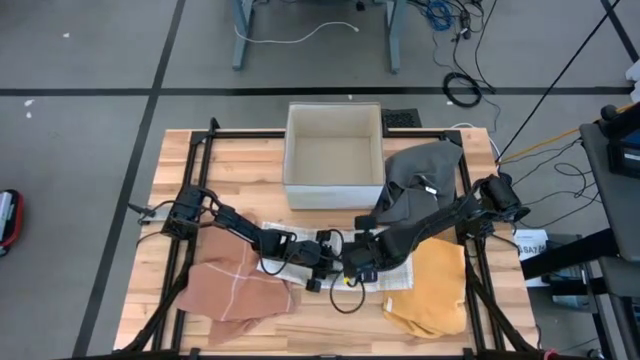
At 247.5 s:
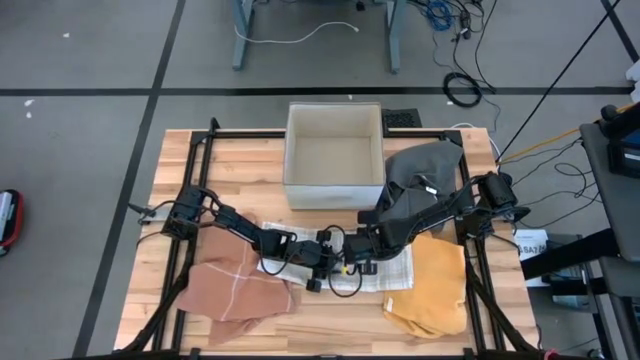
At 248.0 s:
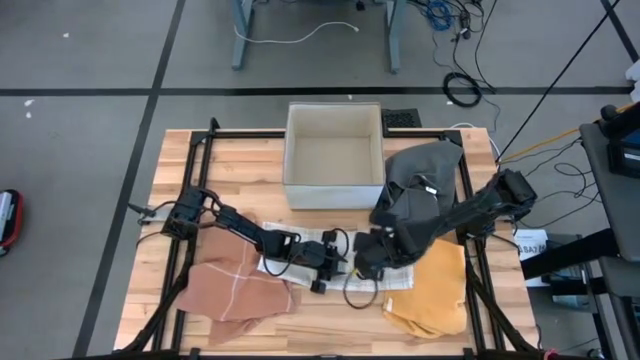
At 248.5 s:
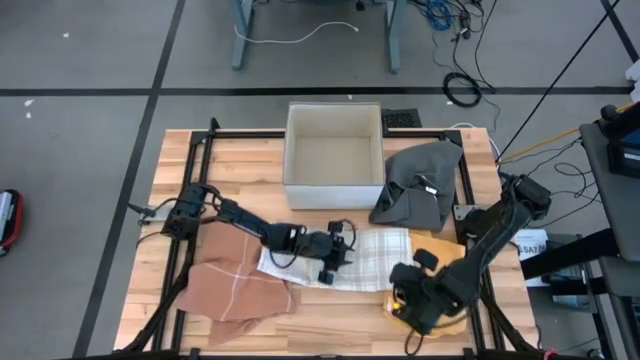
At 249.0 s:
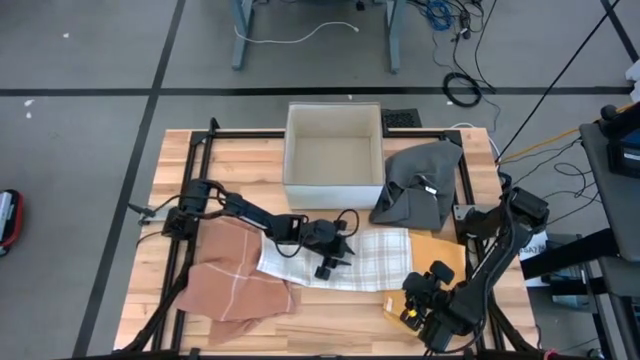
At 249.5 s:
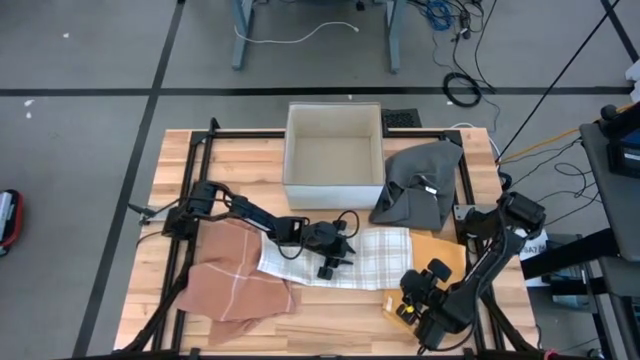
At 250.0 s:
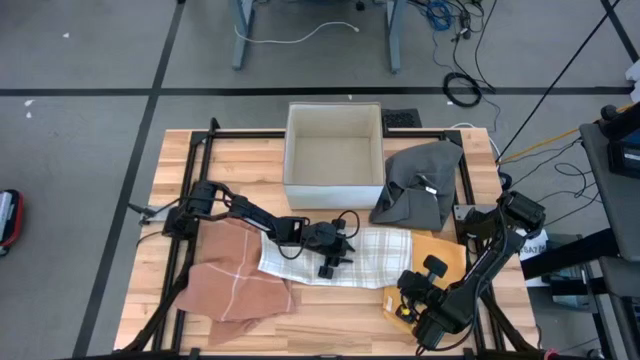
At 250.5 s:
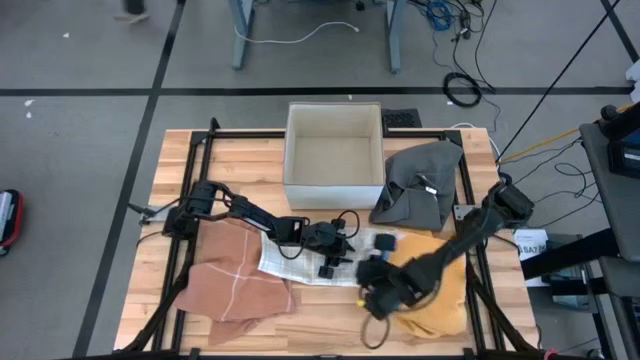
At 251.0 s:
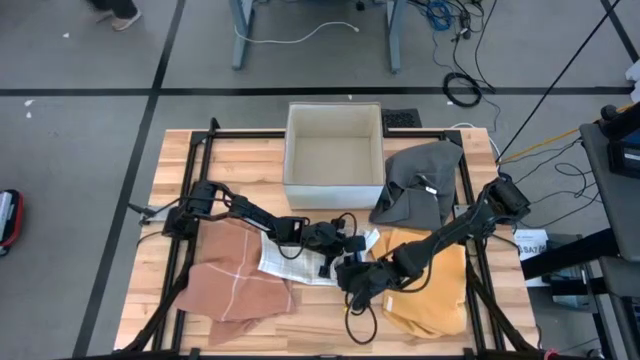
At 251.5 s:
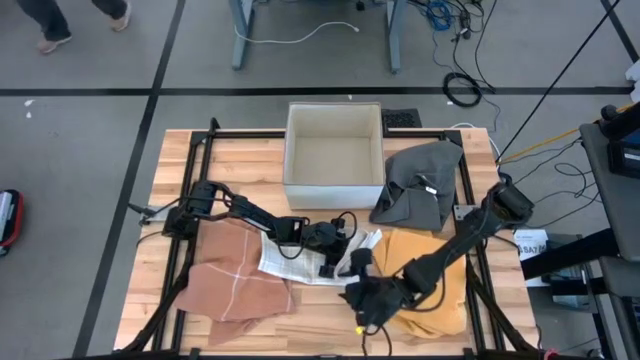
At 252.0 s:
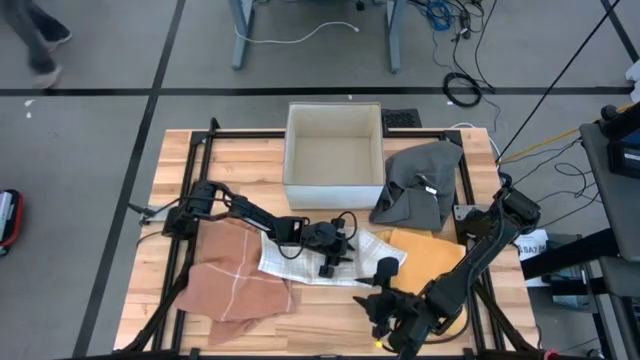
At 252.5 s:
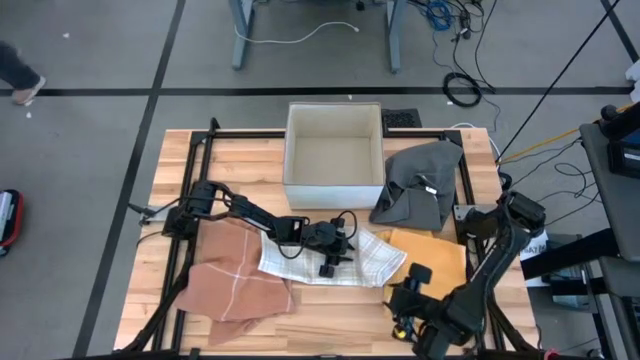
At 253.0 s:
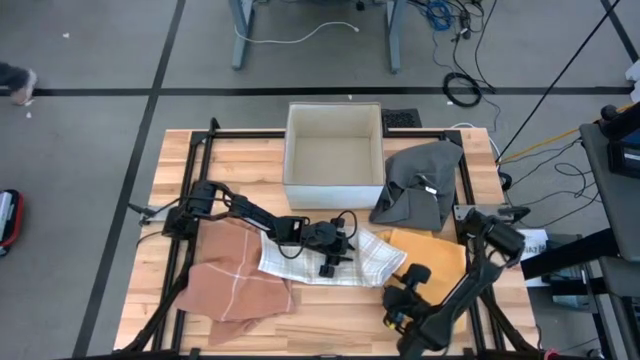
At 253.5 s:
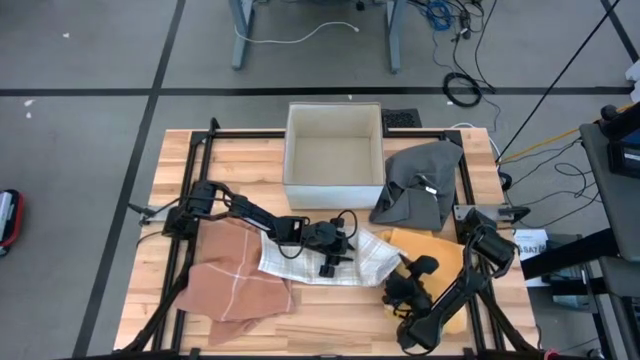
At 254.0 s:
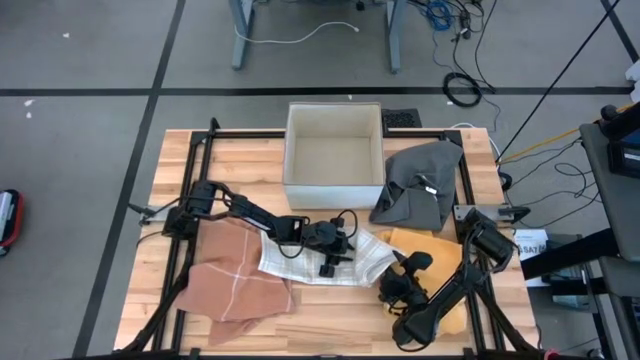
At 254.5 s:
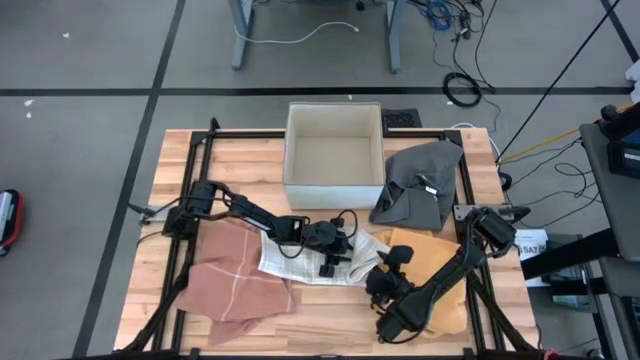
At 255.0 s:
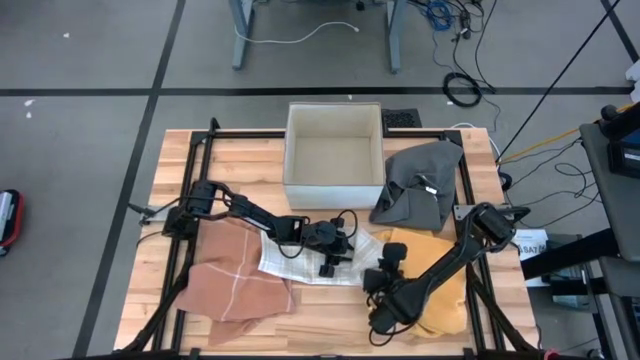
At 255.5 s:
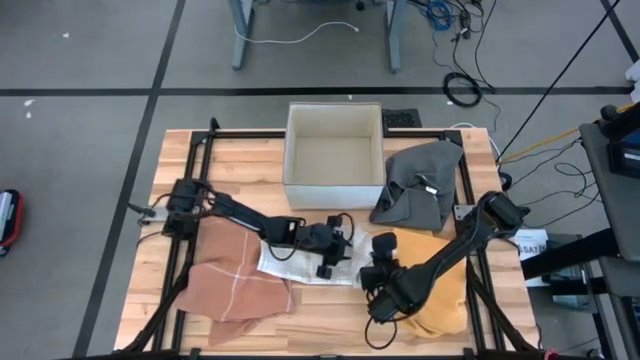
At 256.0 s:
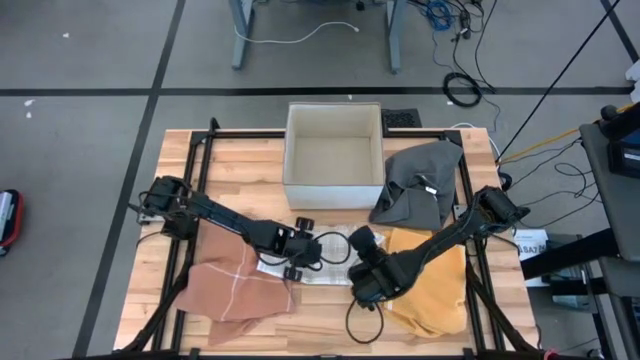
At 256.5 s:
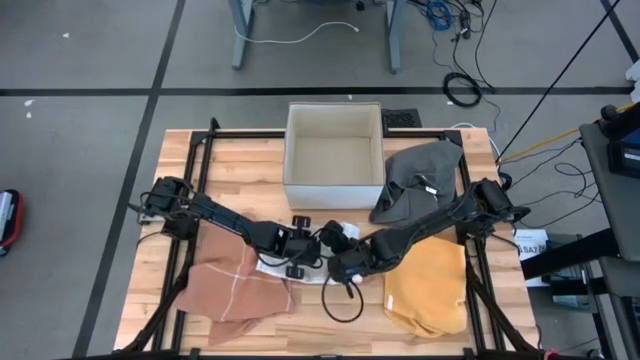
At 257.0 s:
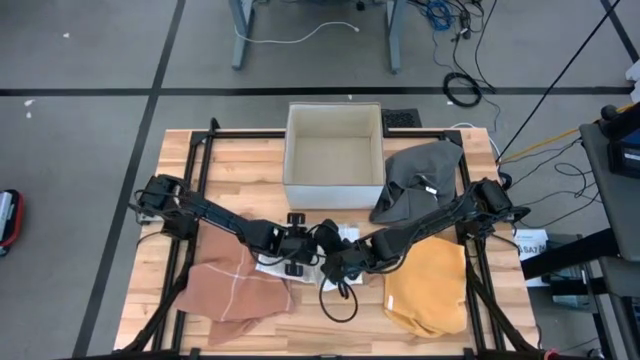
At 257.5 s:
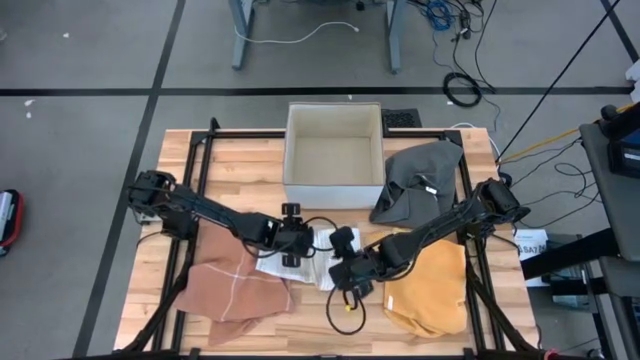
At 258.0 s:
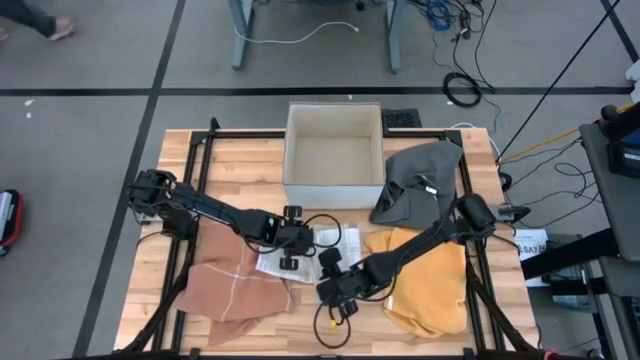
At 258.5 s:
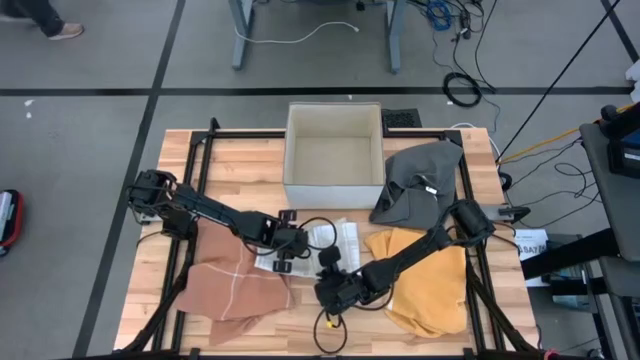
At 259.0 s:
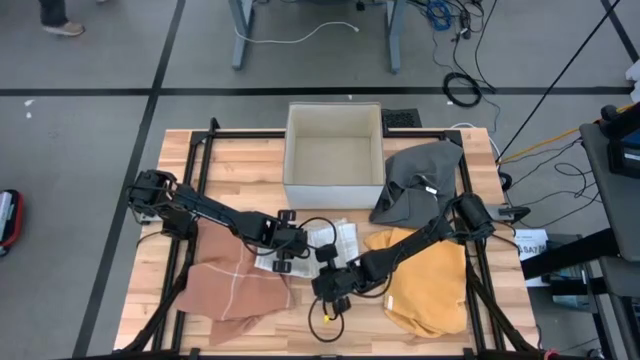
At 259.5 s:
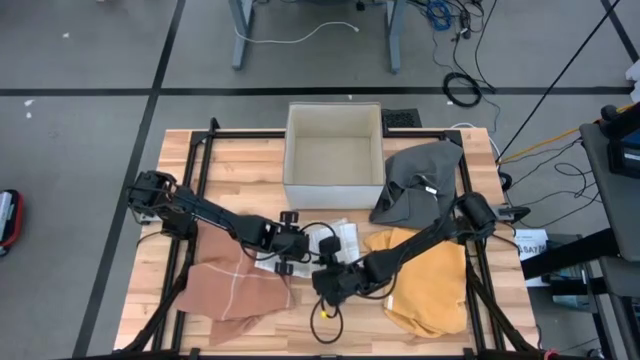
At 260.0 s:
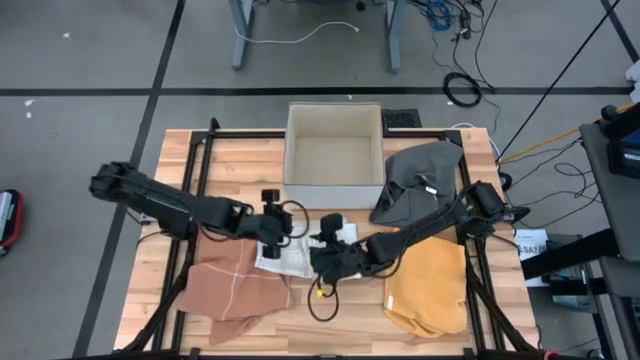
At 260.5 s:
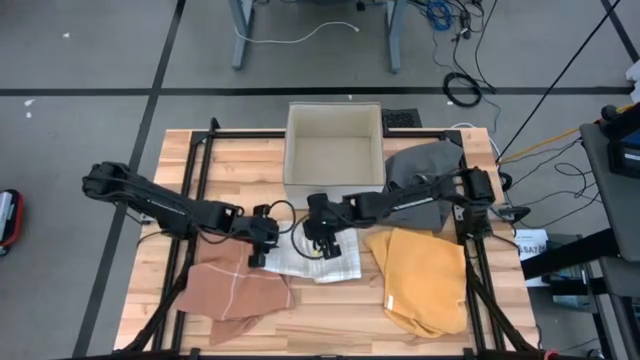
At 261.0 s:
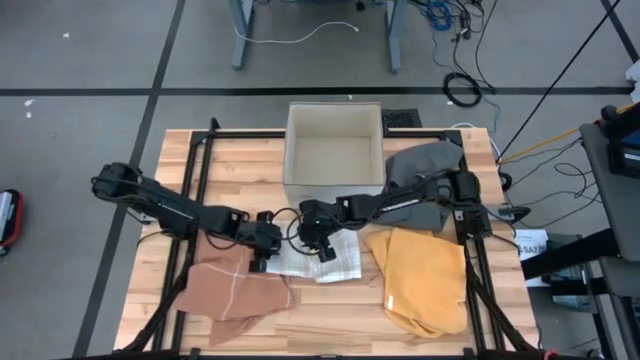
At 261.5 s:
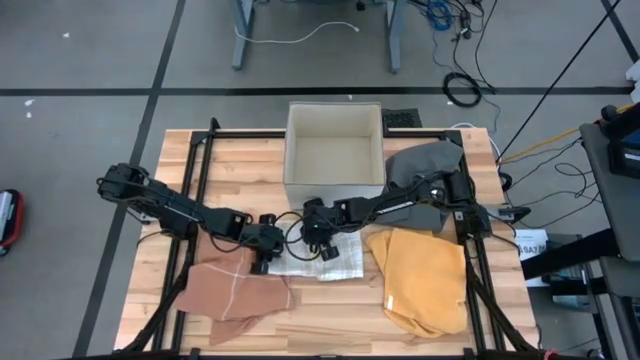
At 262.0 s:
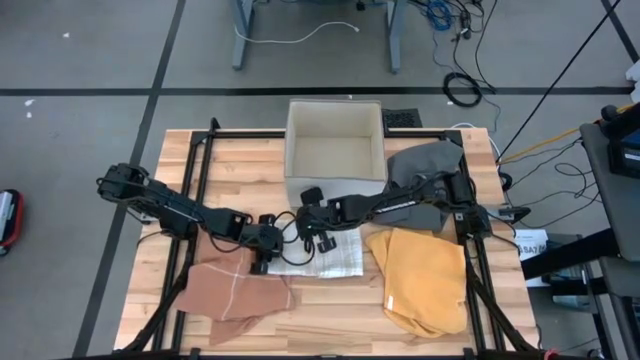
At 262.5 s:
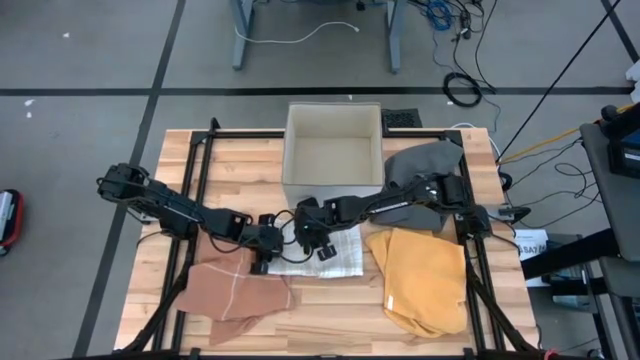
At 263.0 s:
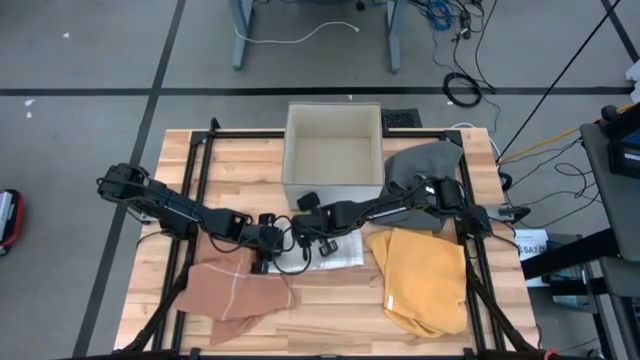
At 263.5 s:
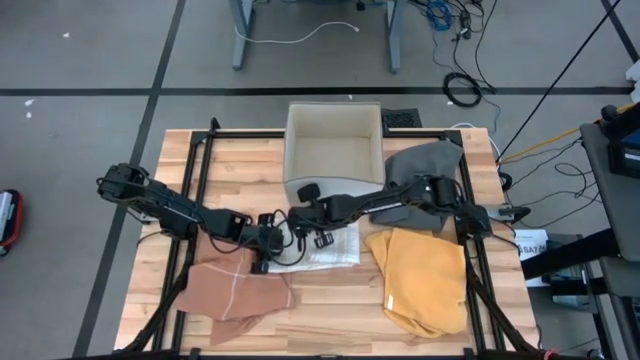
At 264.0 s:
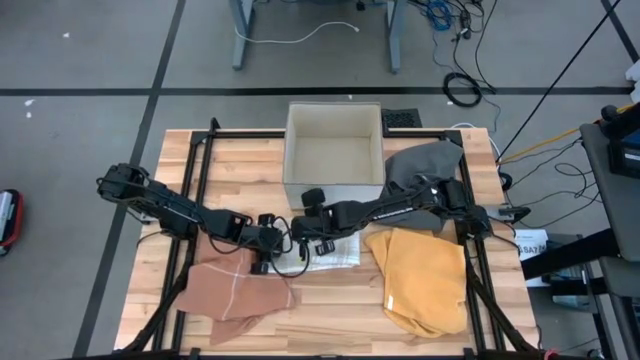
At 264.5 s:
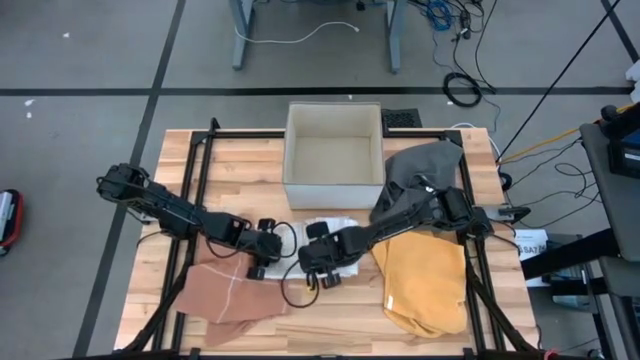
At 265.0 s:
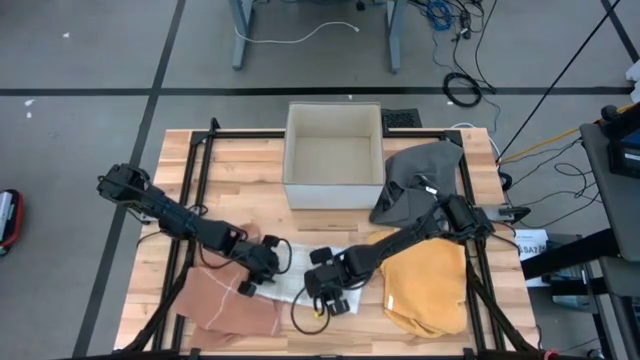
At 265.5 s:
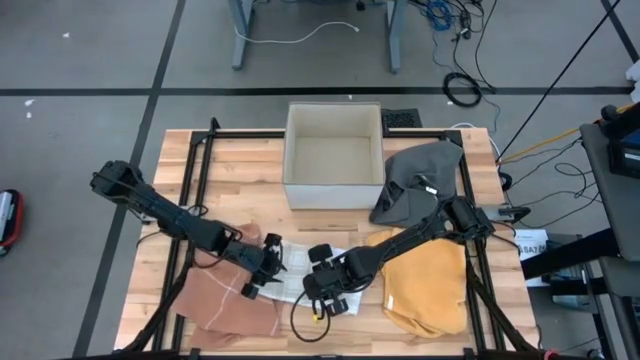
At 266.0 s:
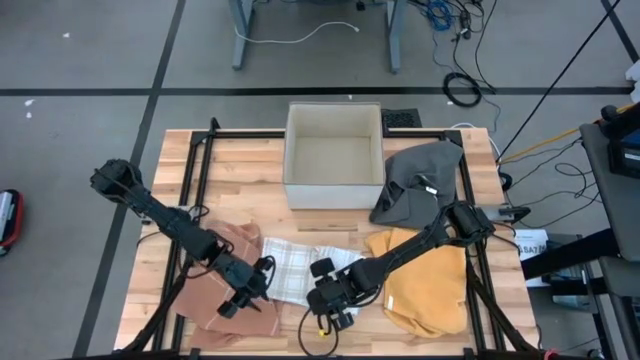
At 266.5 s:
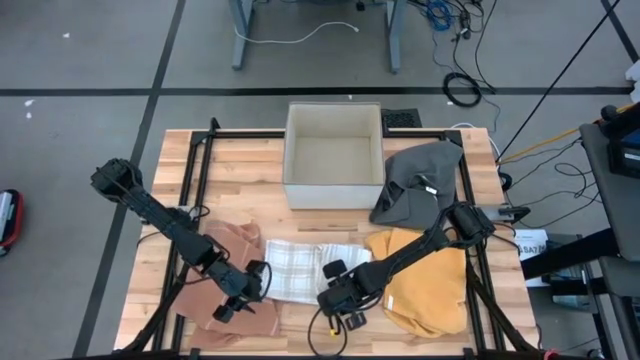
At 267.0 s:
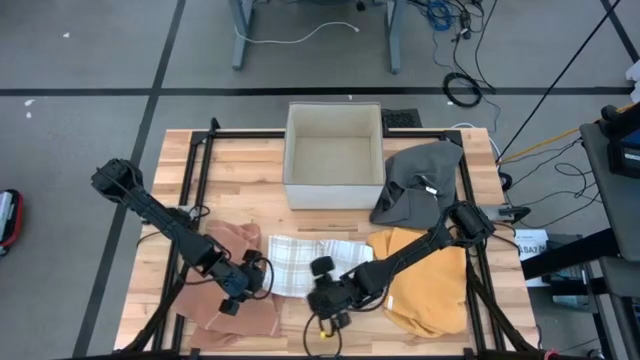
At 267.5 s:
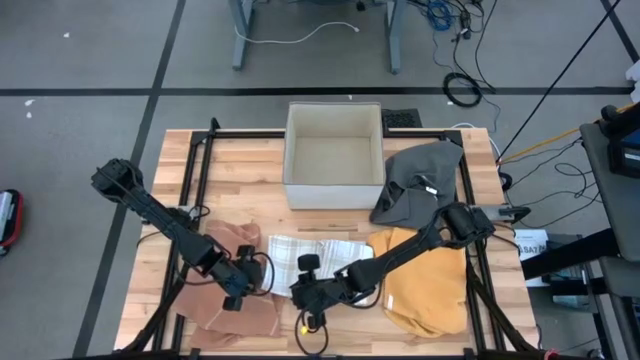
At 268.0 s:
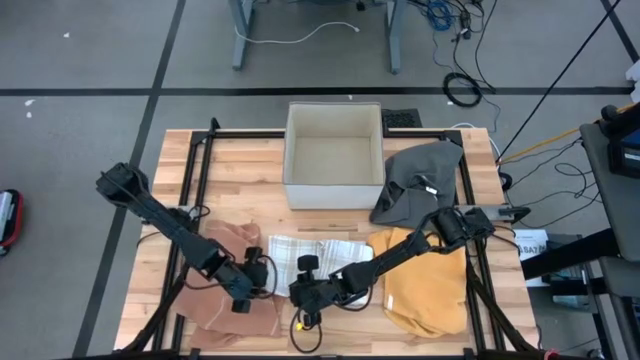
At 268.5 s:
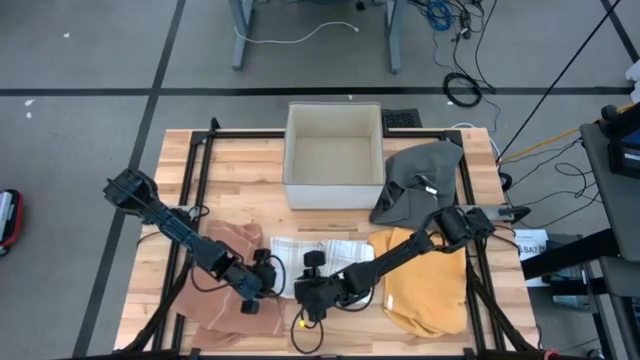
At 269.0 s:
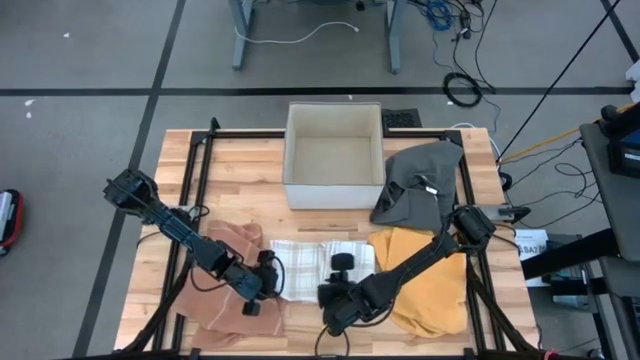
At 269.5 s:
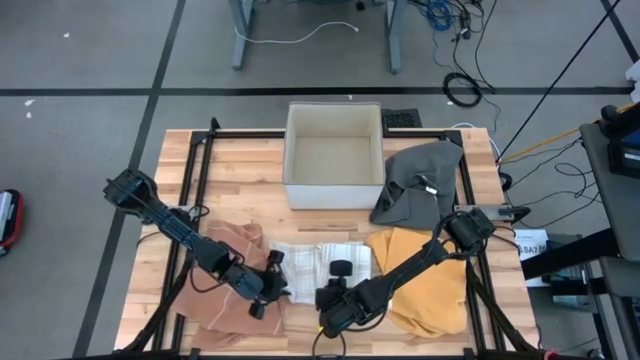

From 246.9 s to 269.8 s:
Task: Fold towel
Fold the white patterned towel
